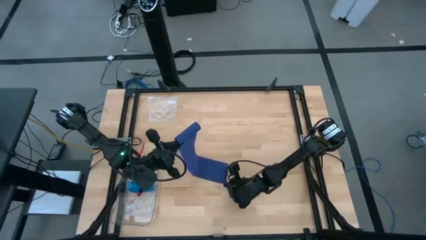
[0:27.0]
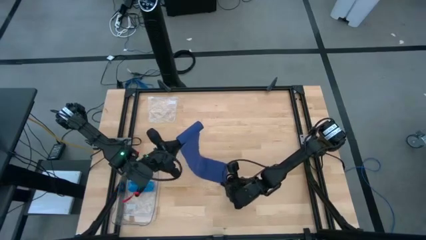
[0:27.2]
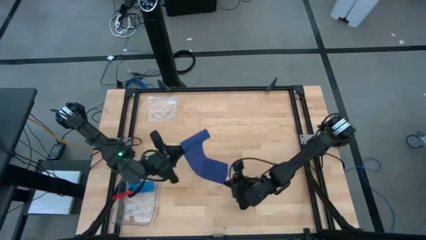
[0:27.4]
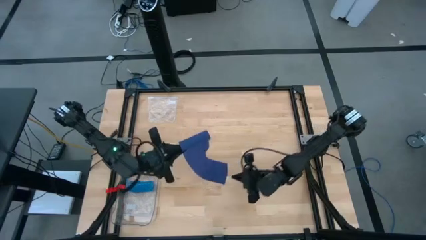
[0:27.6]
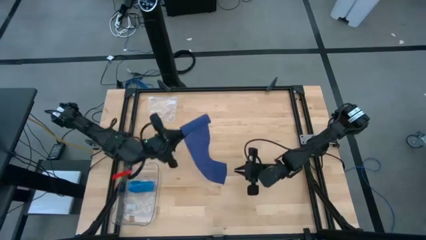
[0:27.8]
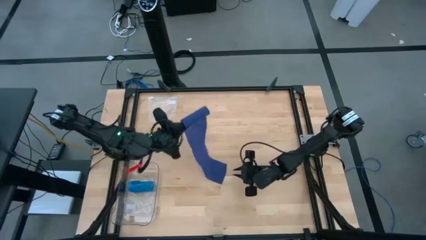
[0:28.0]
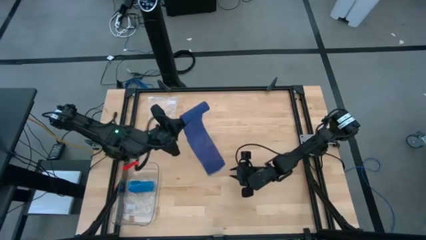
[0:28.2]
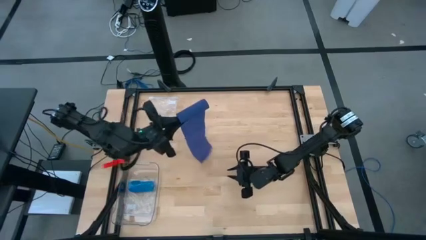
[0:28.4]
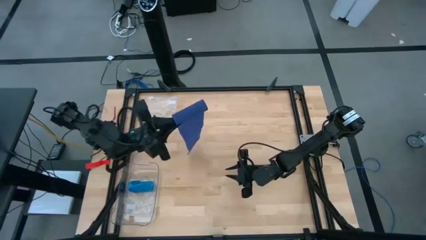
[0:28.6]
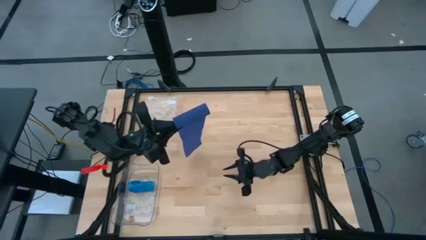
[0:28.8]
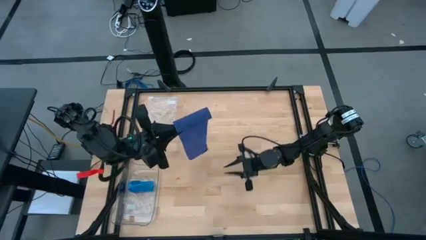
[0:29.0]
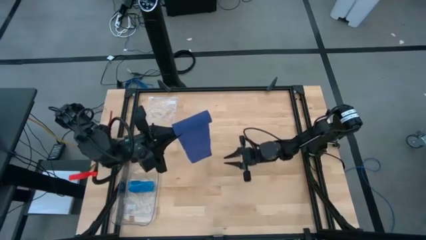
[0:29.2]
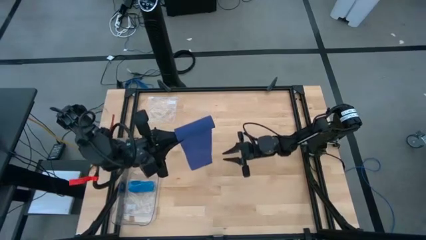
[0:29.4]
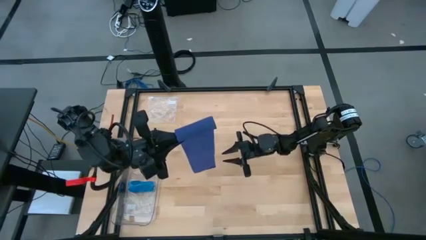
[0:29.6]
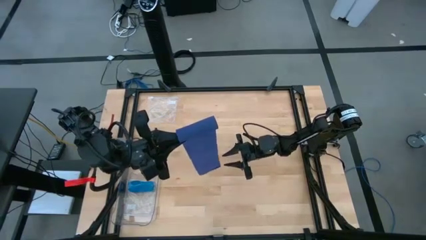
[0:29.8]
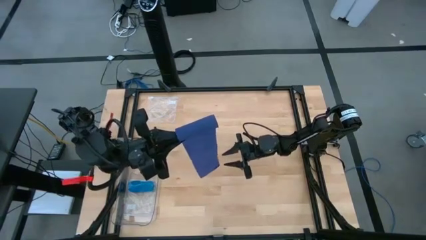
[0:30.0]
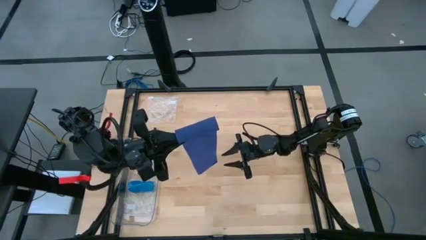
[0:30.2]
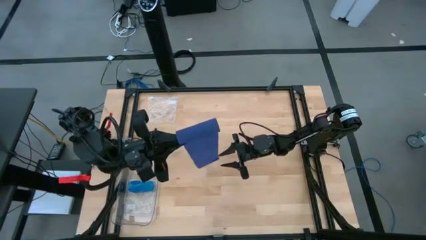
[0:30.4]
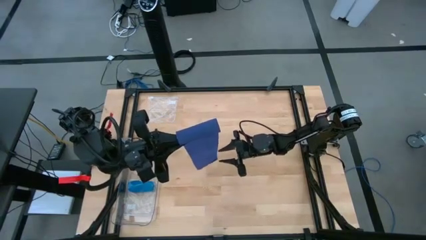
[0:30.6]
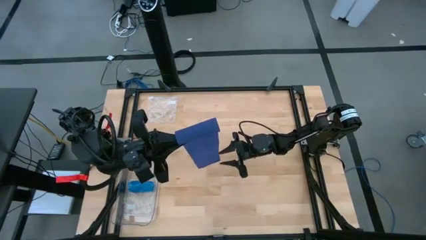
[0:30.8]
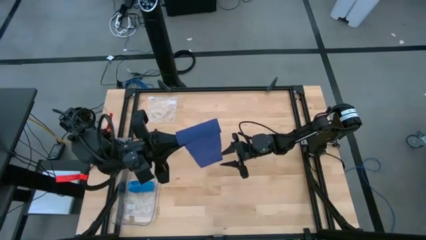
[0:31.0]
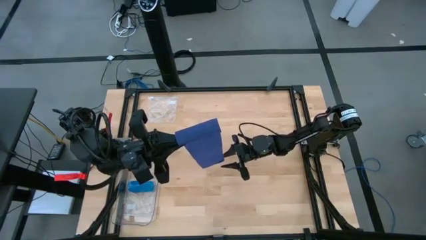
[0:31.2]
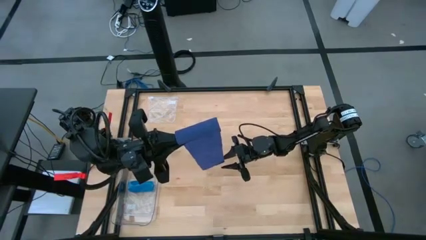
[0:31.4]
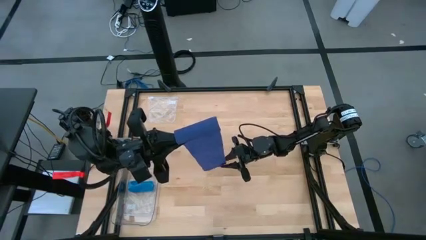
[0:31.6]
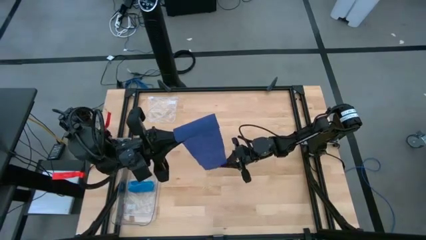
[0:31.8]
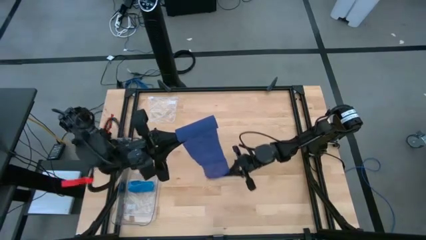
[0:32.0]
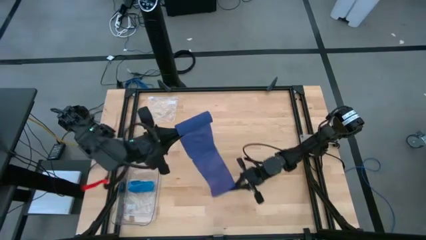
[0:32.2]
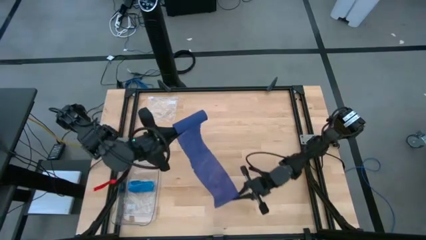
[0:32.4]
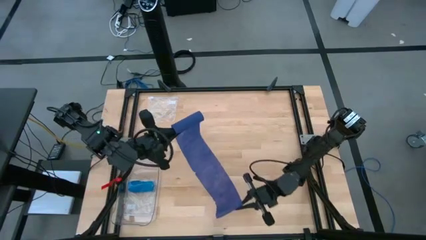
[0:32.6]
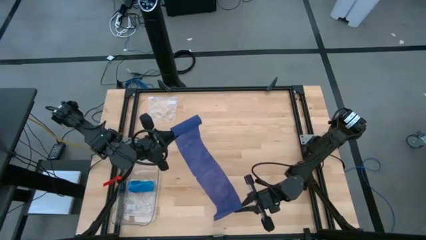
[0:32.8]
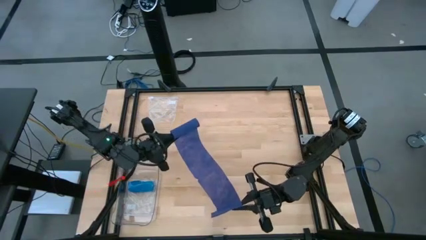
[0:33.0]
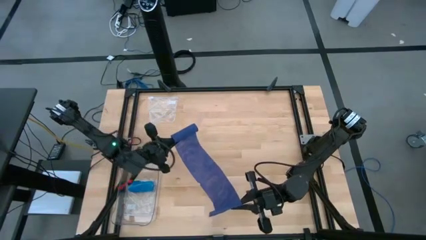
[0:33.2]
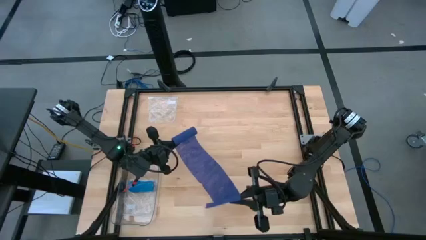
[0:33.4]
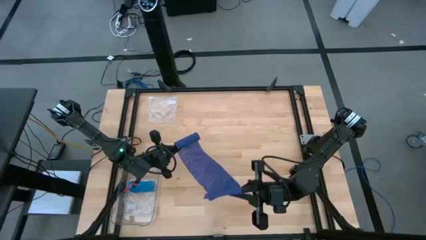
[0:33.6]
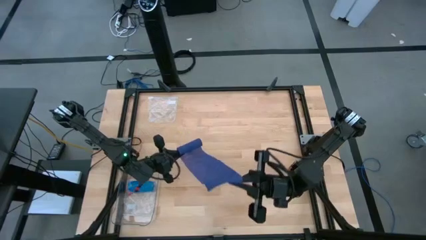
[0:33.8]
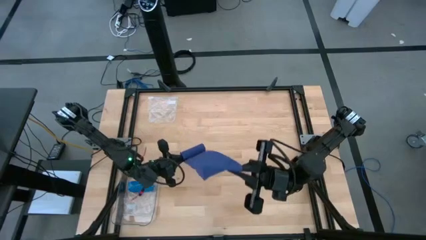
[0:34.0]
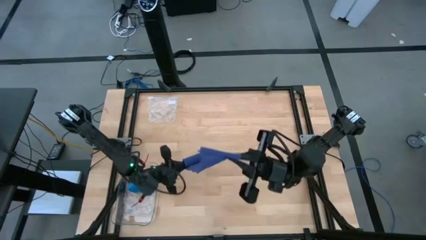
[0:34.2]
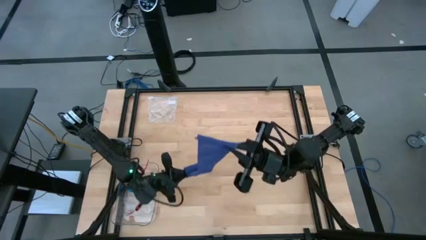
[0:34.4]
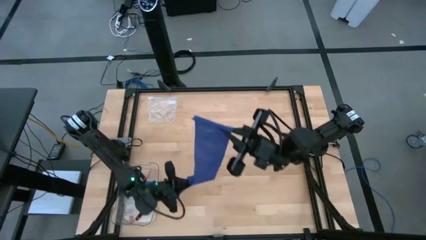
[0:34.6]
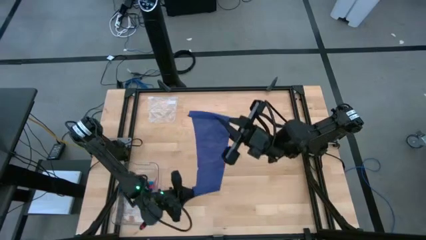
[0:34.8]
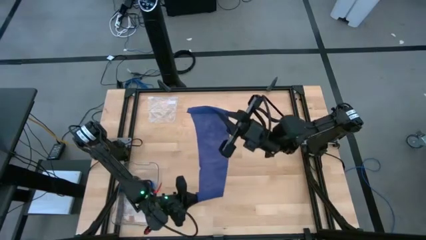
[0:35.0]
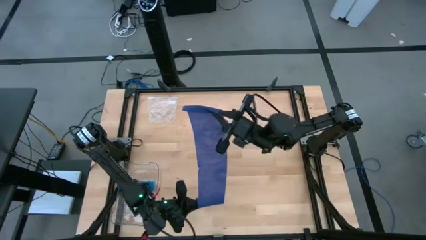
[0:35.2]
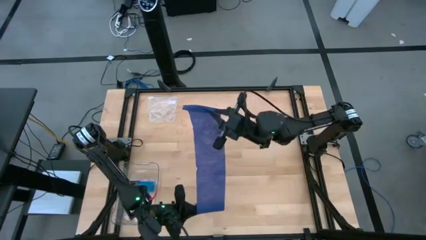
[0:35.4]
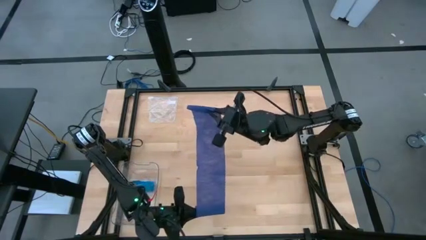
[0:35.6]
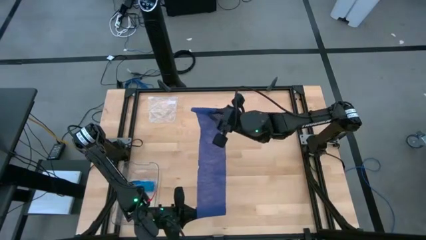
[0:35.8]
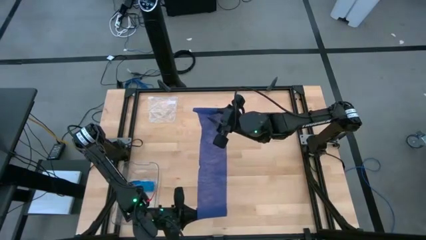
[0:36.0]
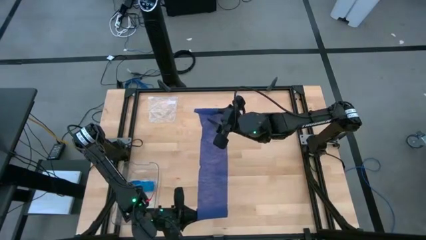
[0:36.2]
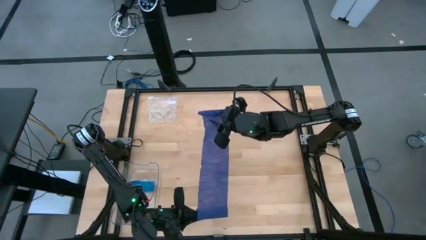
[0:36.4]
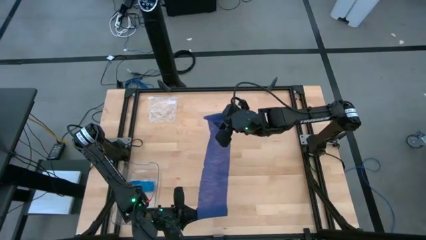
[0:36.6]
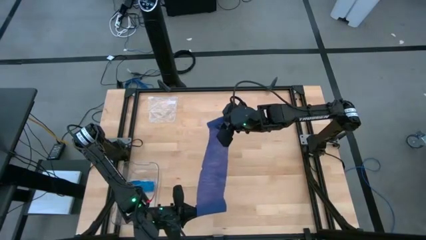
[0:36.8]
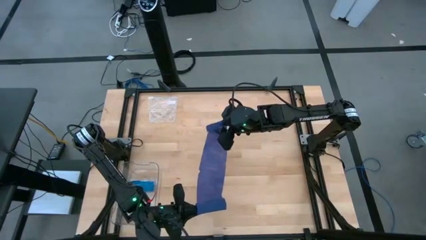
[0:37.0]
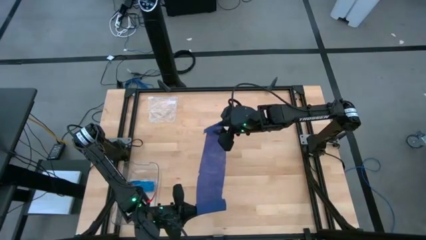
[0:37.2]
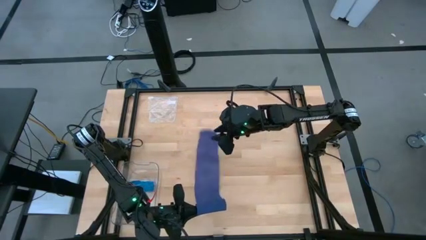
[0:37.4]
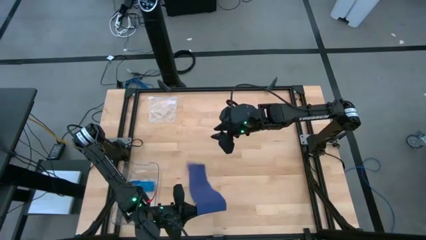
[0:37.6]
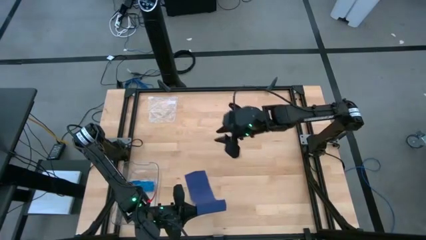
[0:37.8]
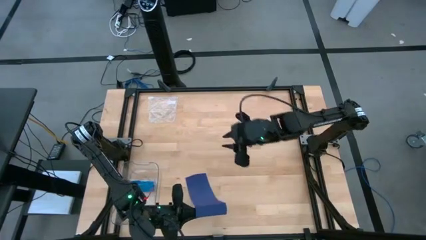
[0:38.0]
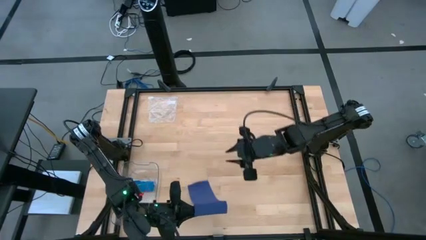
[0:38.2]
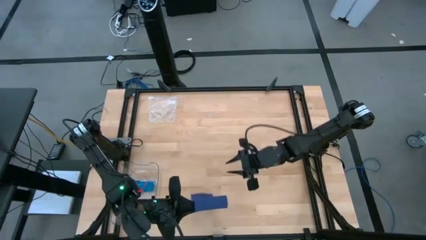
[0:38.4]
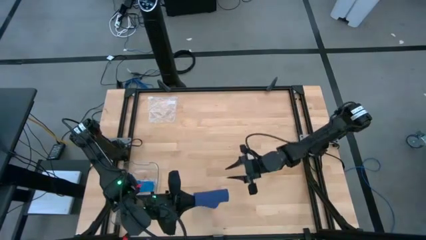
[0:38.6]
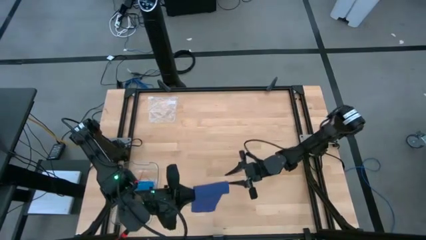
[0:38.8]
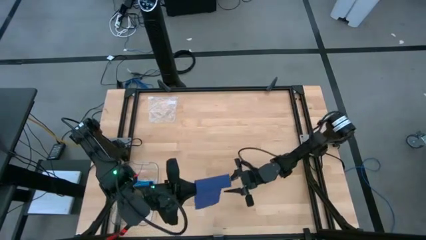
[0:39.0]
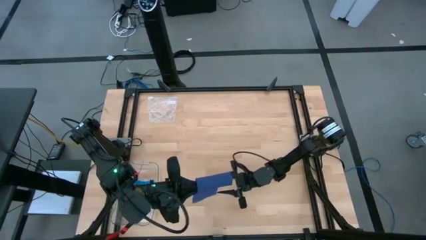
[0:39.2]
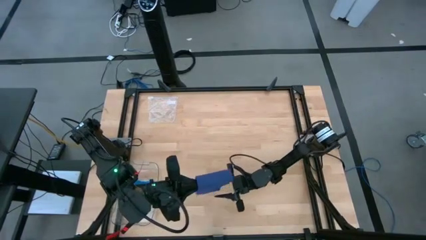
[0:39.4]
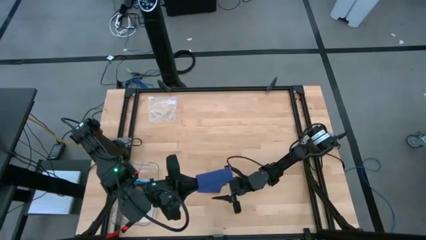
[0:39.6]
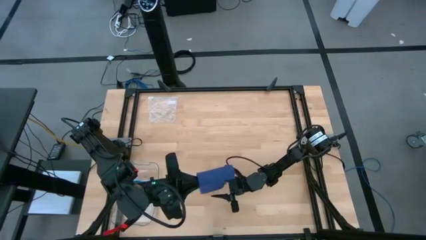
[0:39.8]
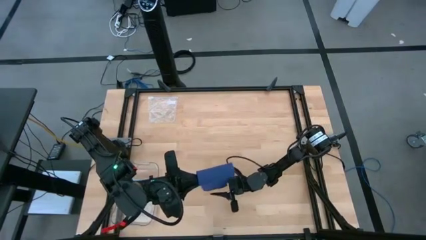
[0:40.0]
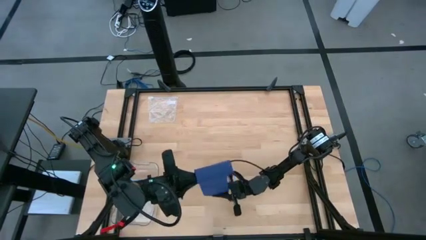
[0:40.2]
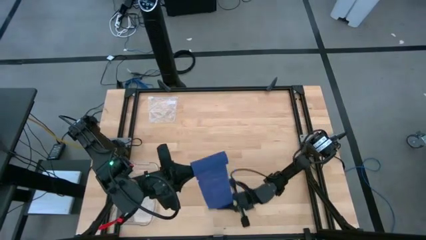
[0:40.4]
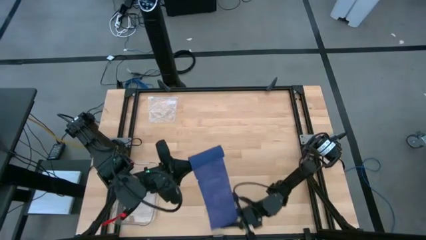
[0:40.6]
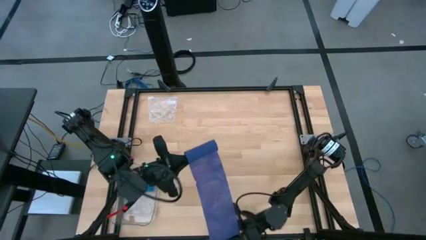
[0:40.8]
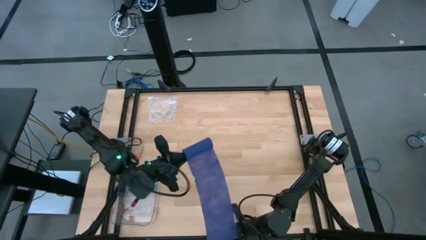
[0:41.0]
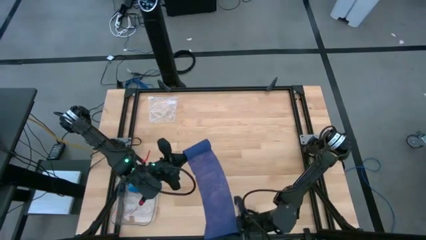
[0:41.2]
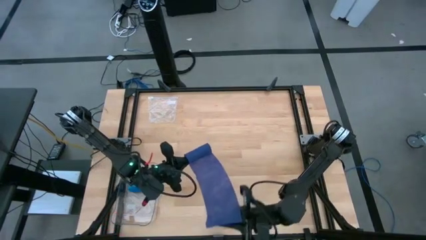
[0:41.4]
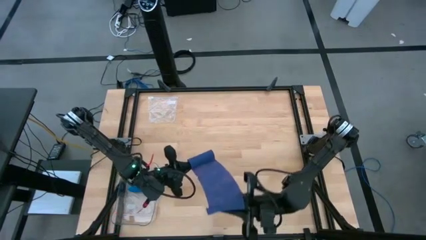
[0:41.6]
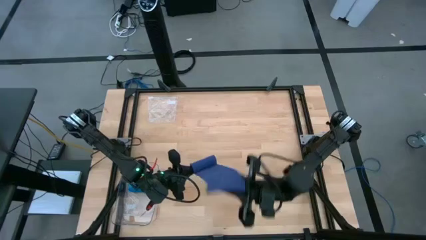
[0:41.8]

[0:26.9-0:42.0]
Task: Roll bandage
Roll the blue bandage
